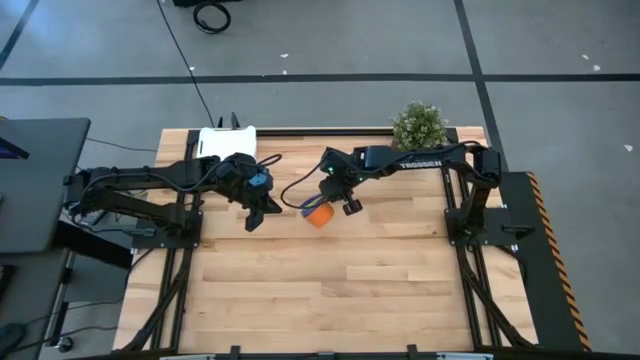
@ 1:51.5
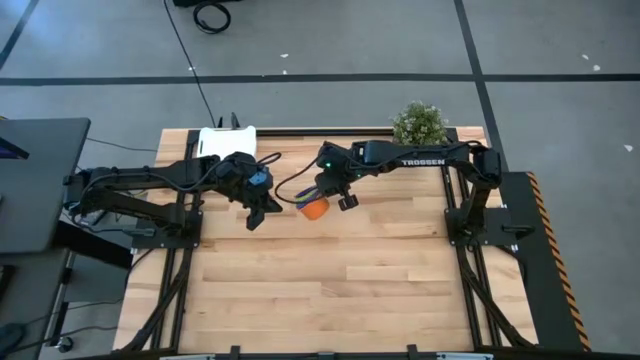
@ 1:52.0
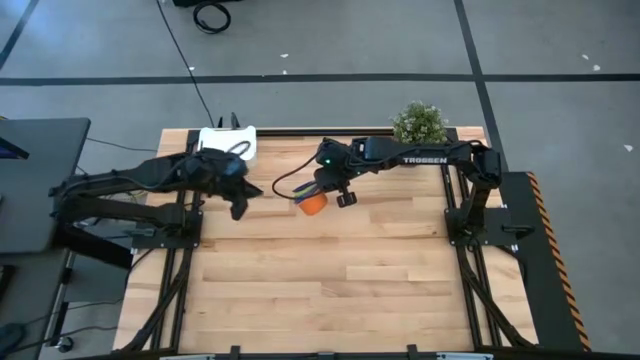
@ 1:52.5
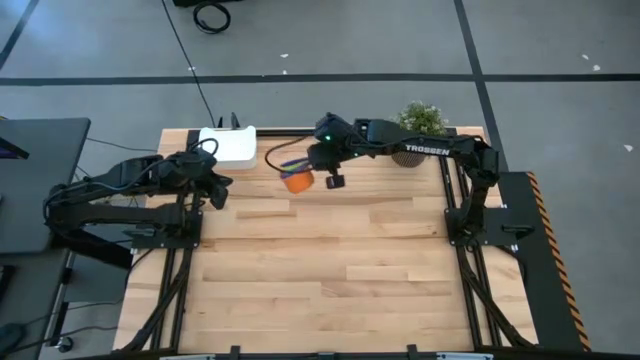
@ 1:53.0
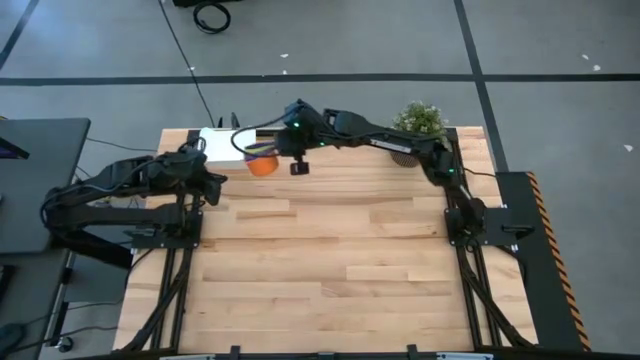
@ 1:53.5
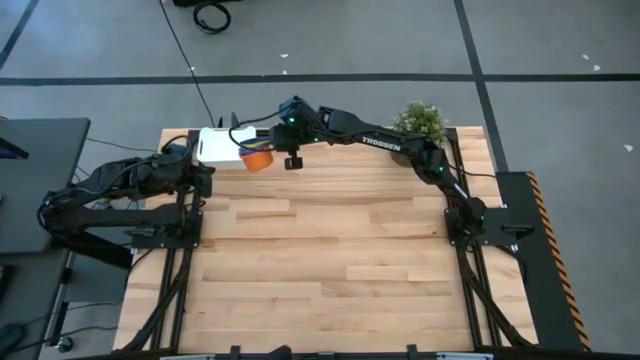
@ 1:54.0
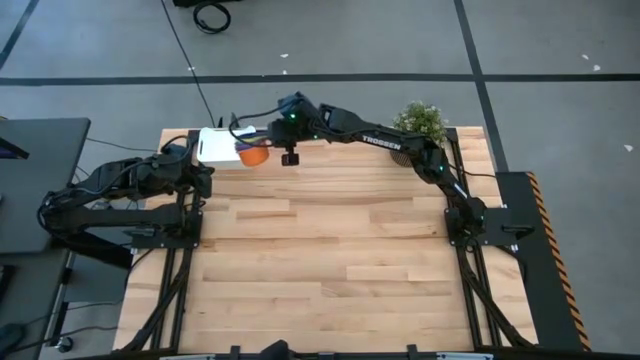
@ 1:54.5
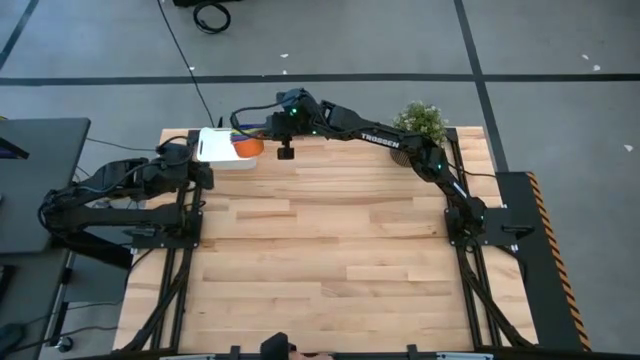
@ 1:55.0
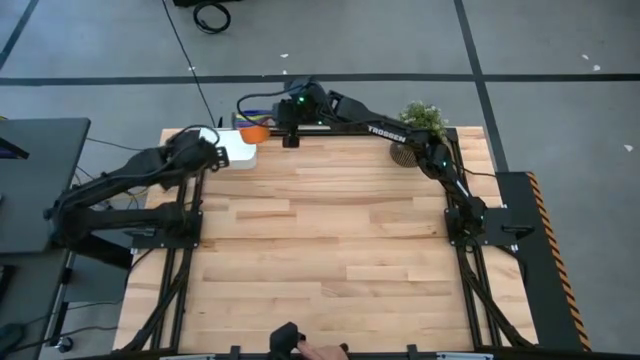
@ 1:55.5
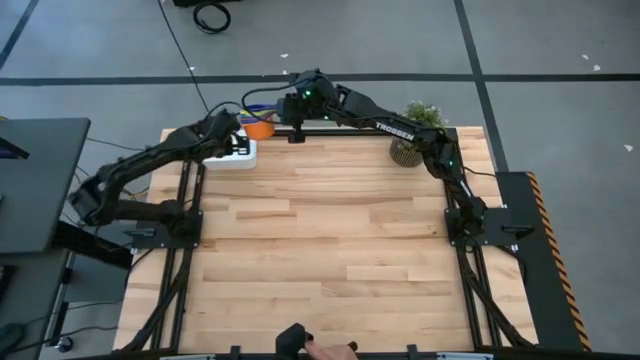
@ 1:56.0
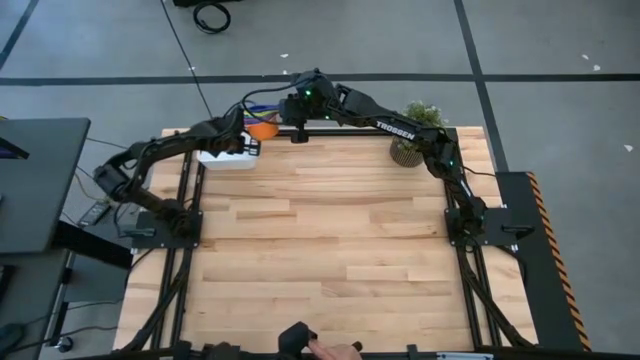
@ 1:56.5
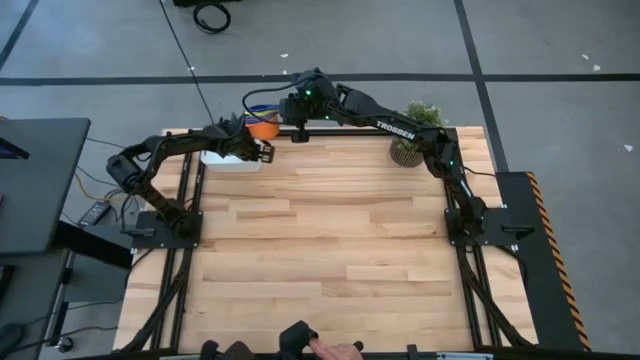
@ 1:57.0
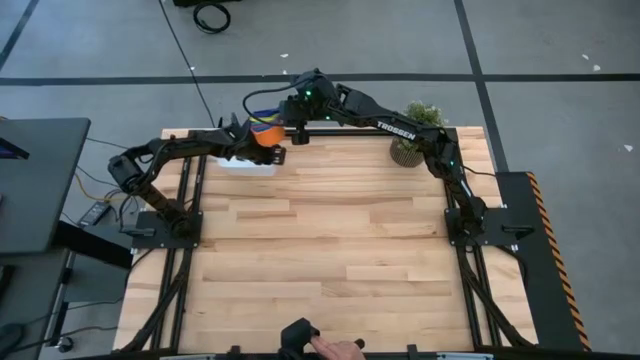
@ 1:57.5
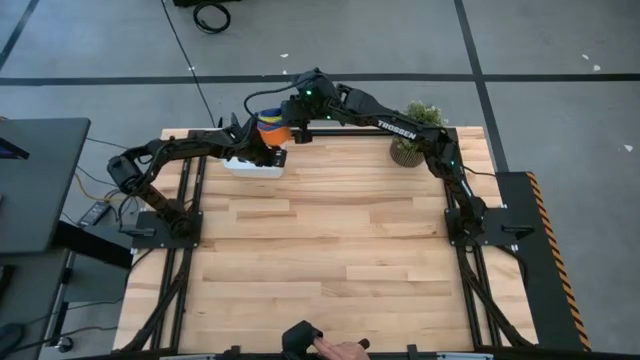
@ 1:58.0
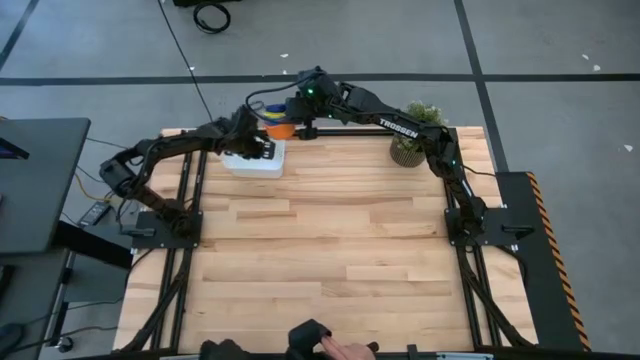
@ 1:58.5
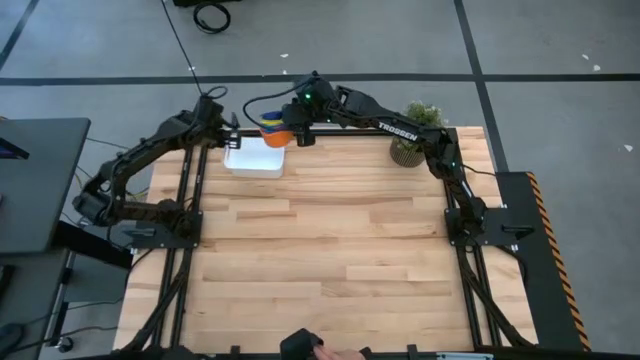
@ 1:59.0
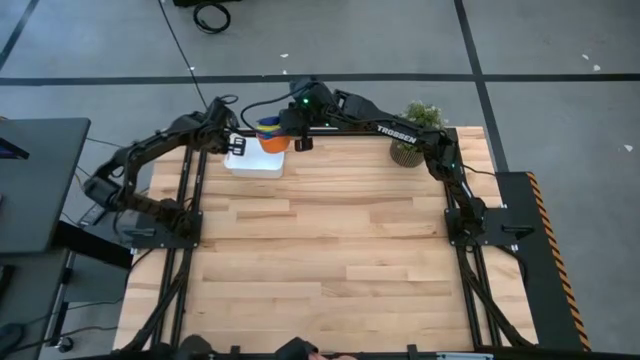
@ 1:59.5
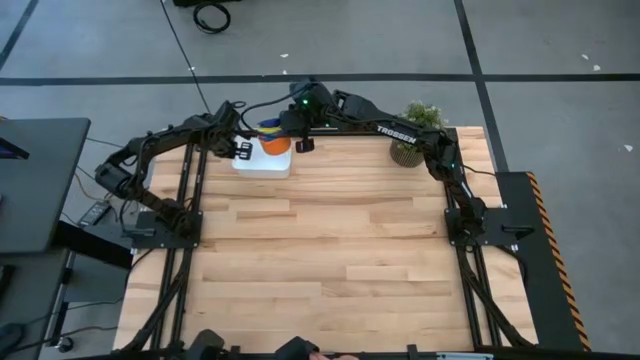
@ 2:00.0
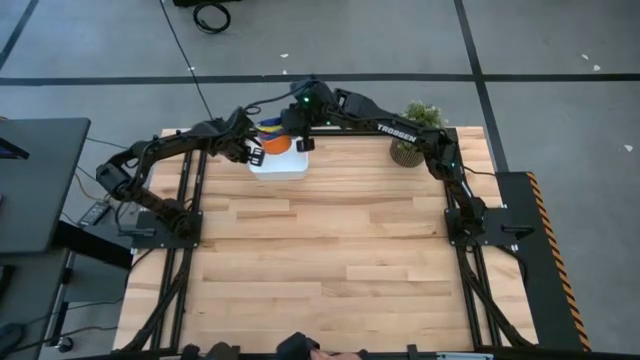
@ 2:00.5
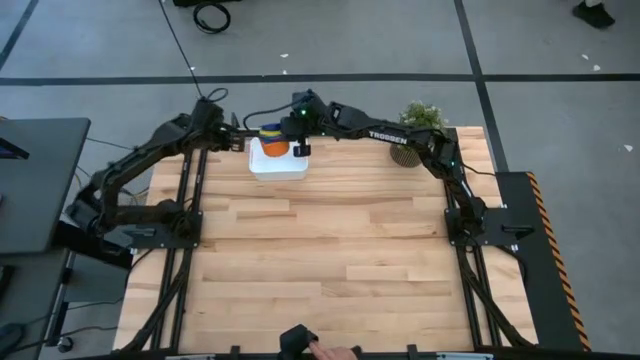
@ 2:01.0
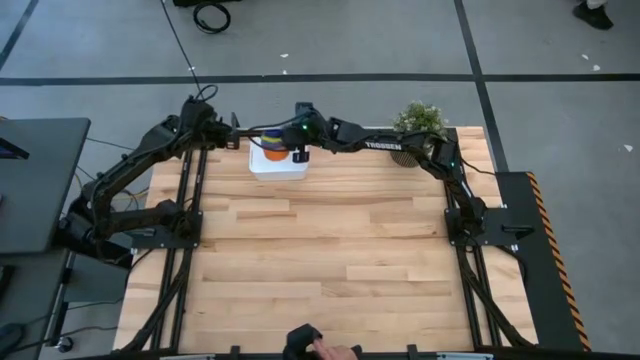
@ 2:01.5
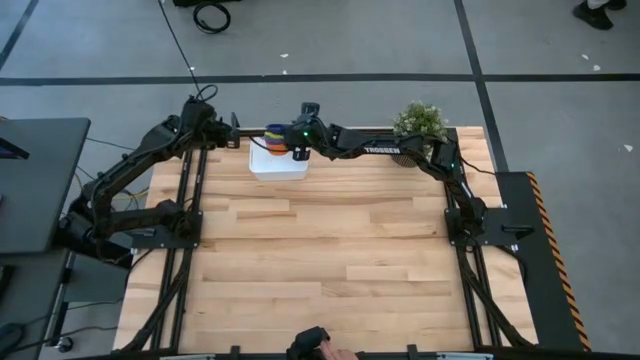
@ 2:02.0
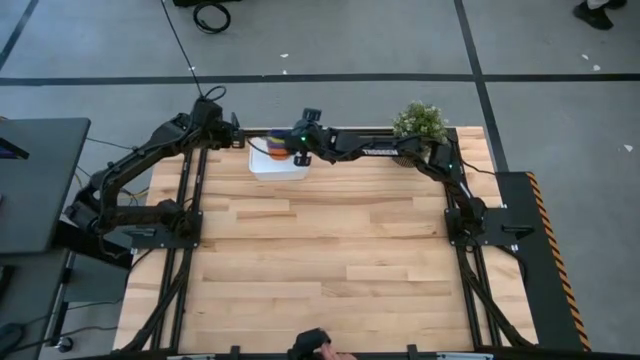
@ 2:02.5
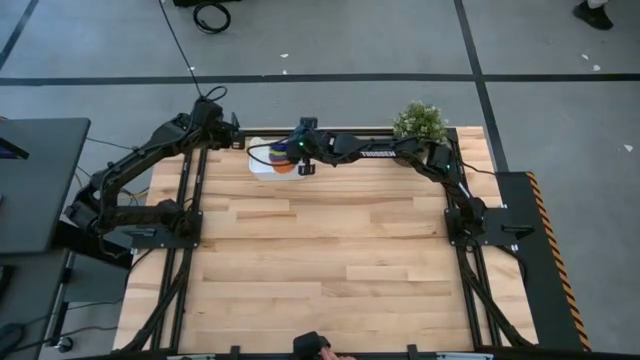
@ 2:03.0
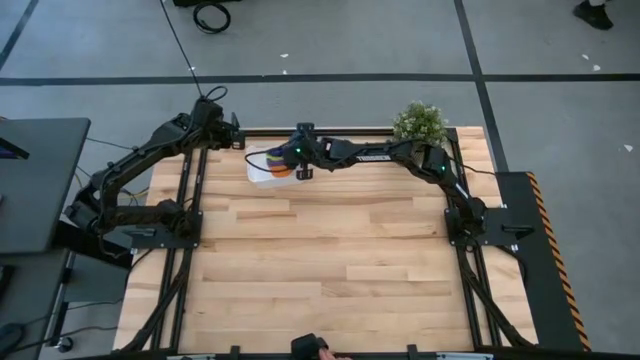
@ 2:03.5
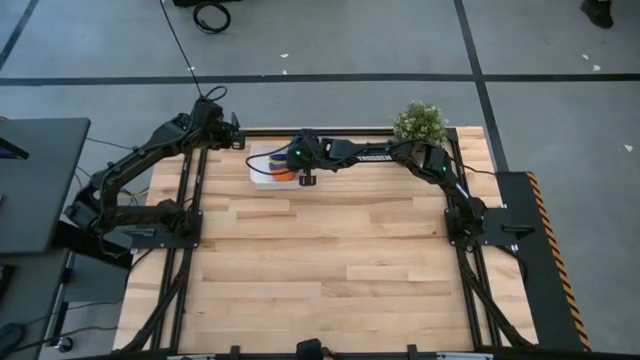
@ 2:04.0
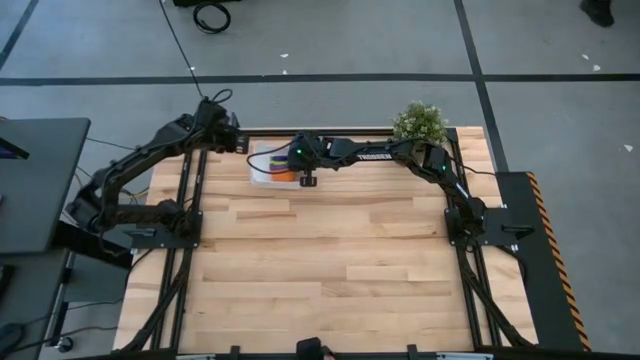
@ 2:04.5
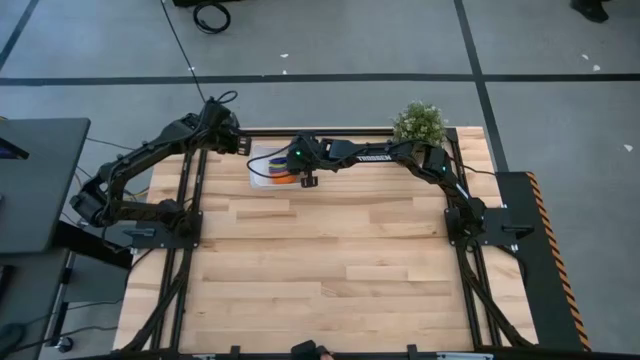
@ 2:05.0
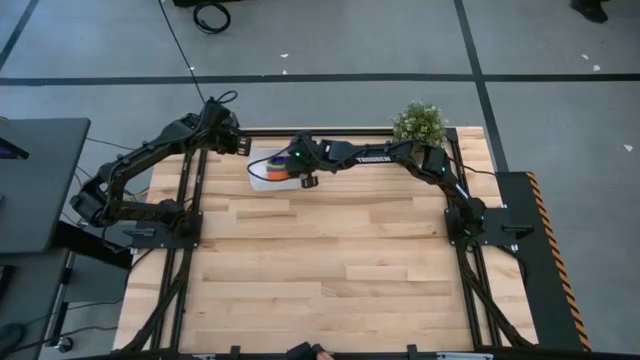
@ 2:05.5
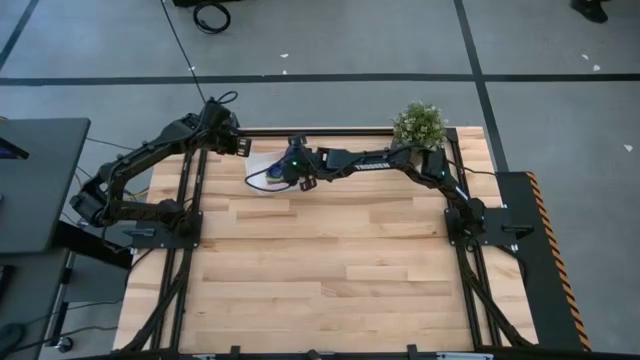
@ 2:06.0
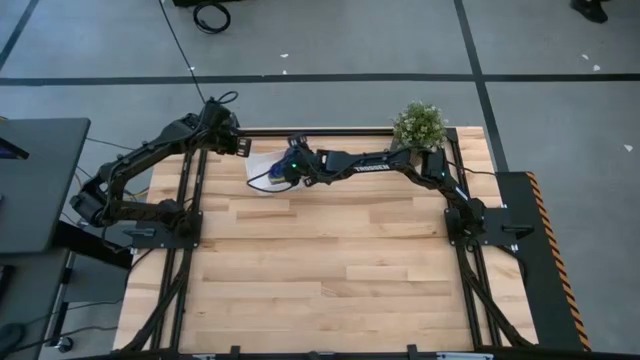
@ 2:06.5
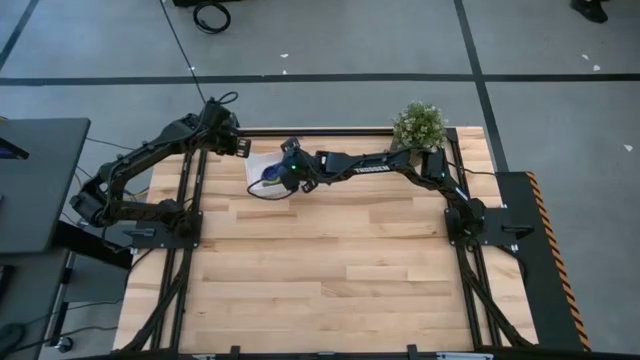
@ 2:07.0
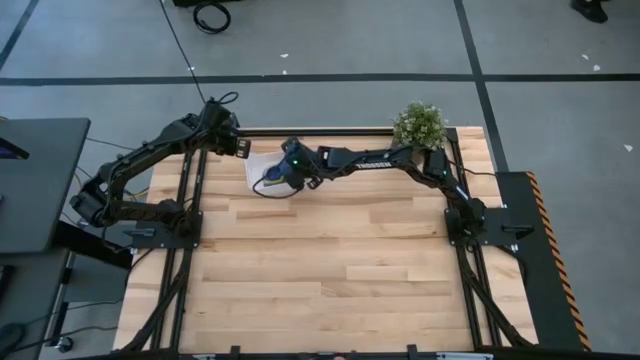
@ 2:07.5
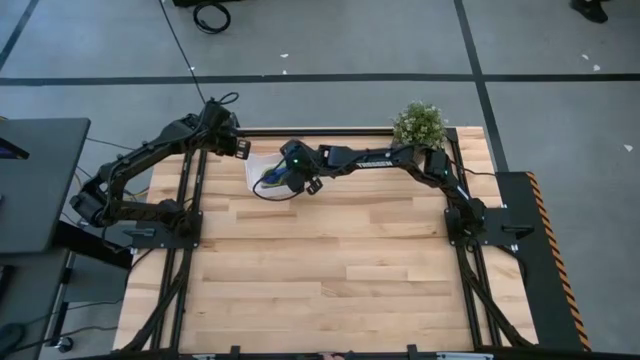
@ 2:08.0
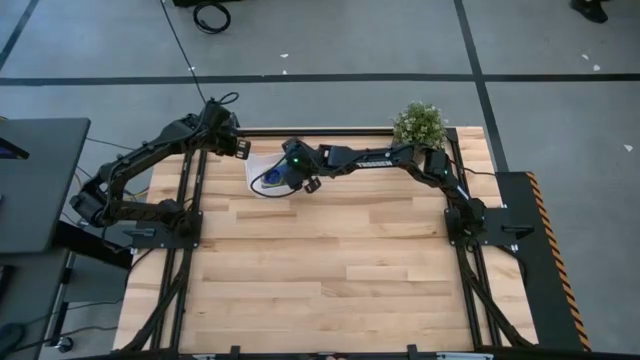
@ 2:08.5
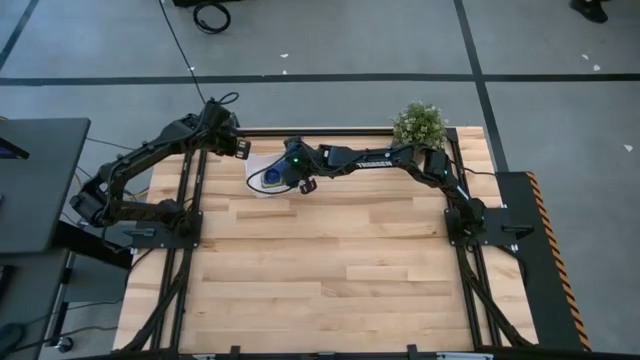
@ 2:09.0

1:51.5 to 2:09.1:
Task: Nest measuring cups in basket
Put the nested measuring cups into the white bin

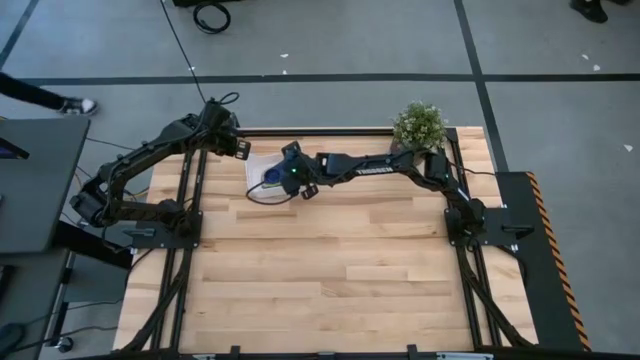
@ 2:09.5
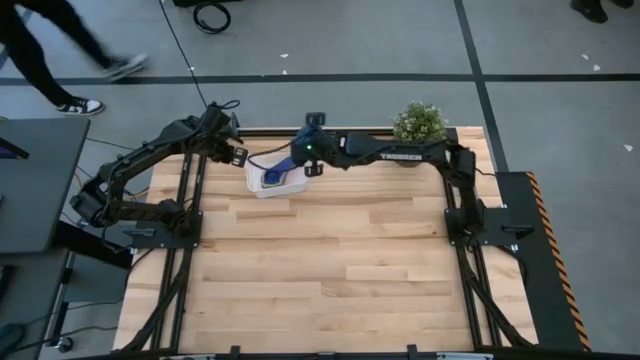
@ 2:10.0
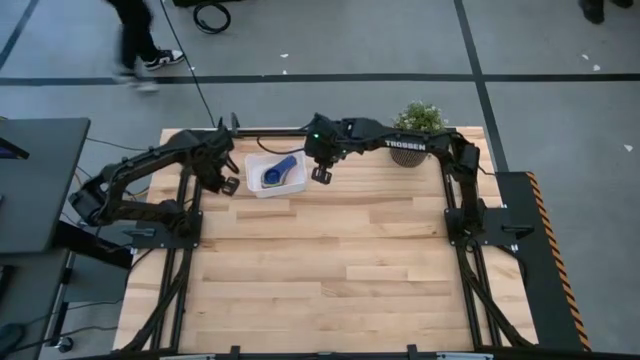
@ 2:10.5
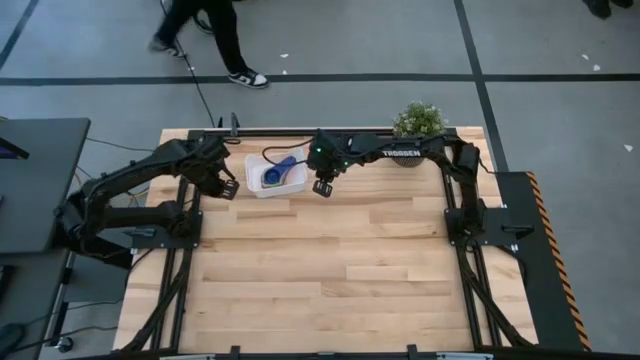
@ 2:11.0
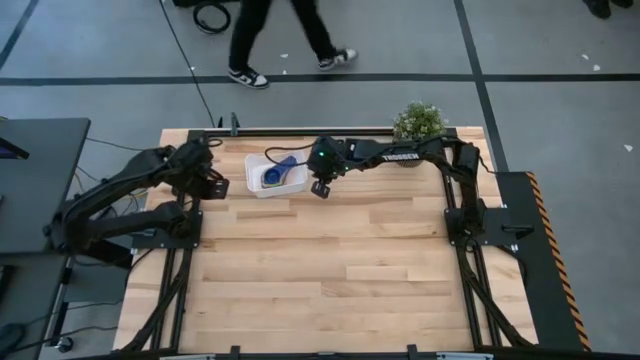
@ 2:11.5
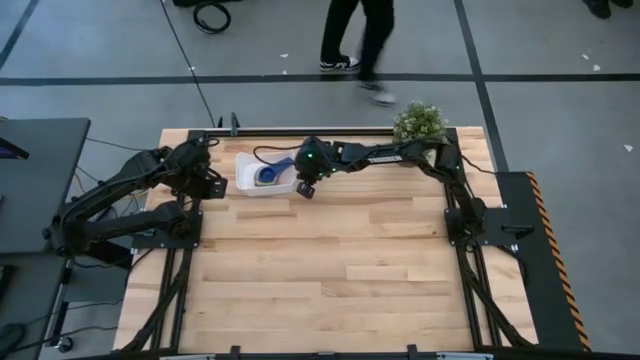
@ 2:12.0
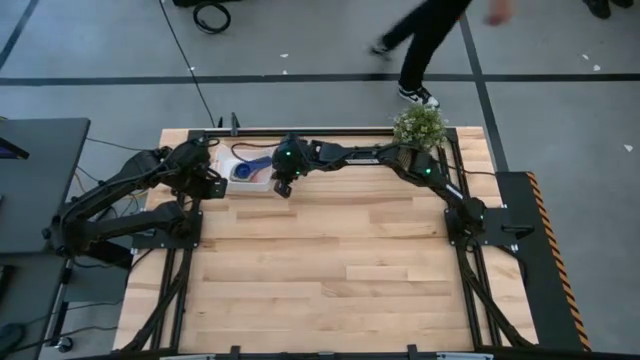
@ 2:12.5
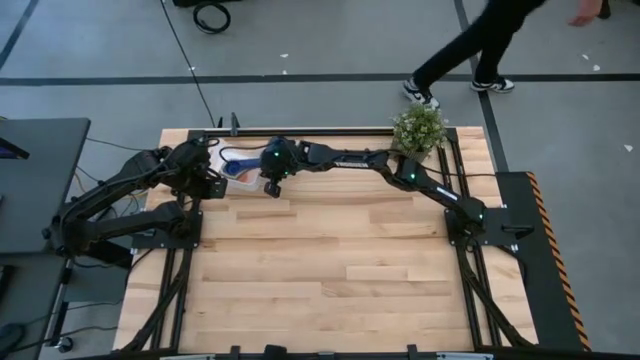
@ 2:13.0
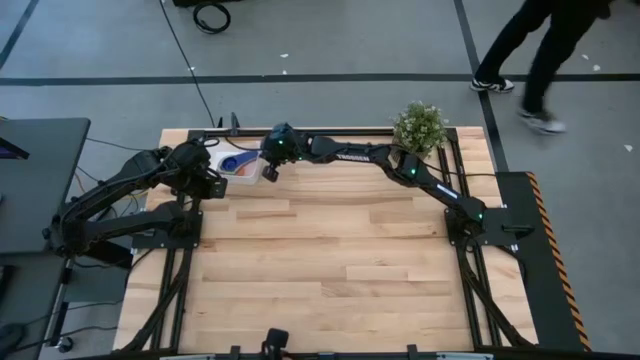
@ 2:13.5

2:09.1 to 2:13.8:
Adjust the white bin
